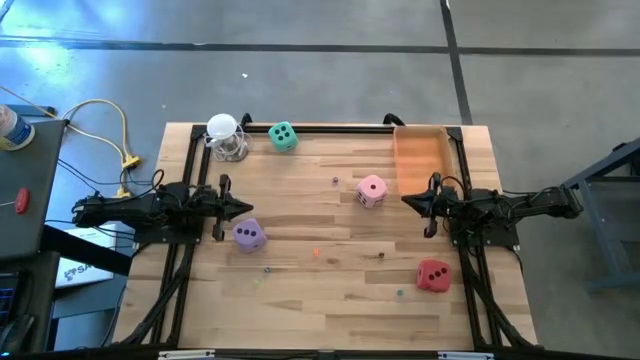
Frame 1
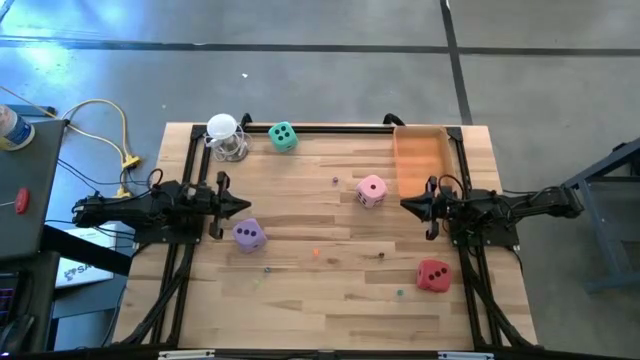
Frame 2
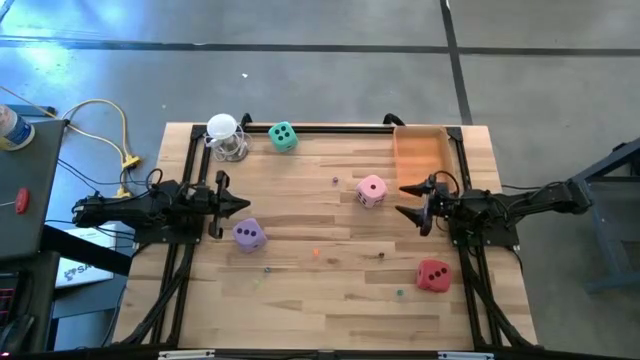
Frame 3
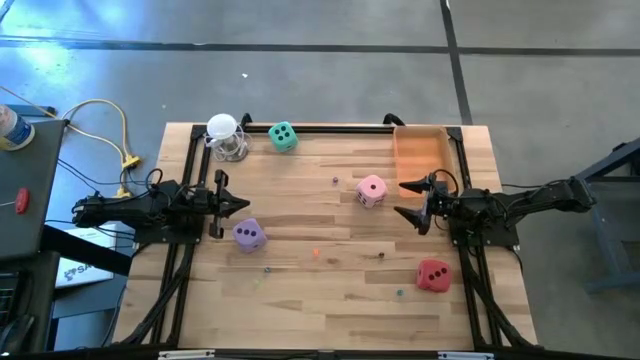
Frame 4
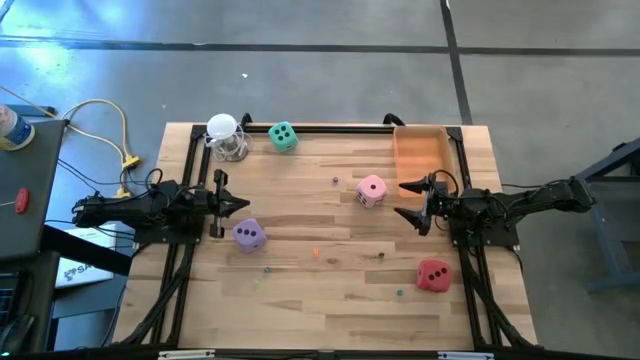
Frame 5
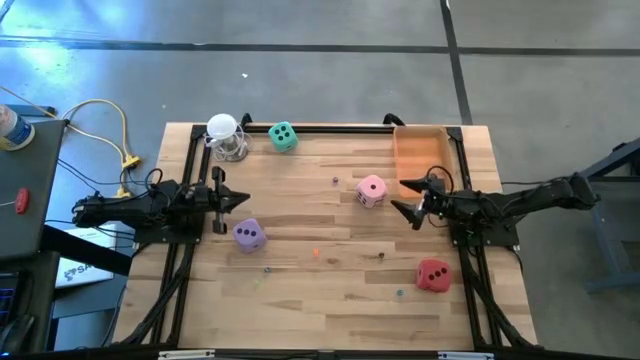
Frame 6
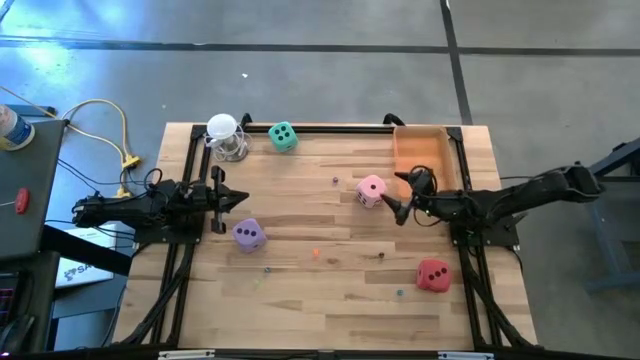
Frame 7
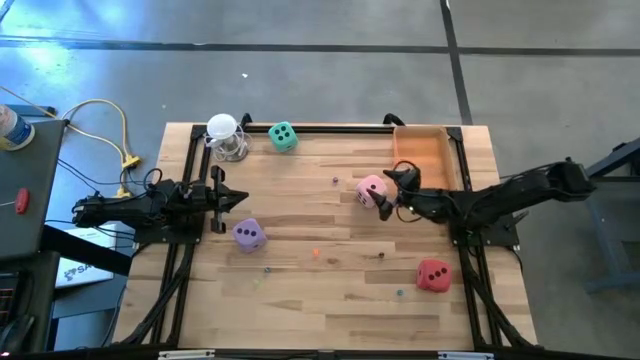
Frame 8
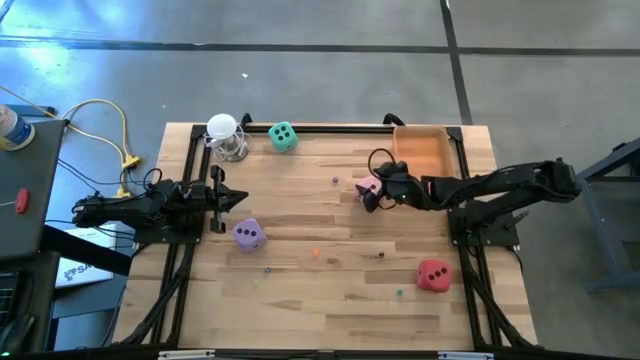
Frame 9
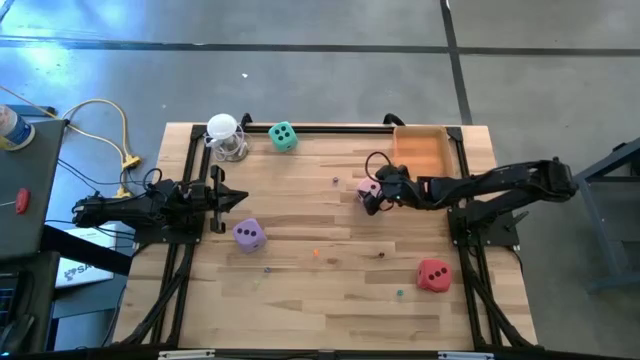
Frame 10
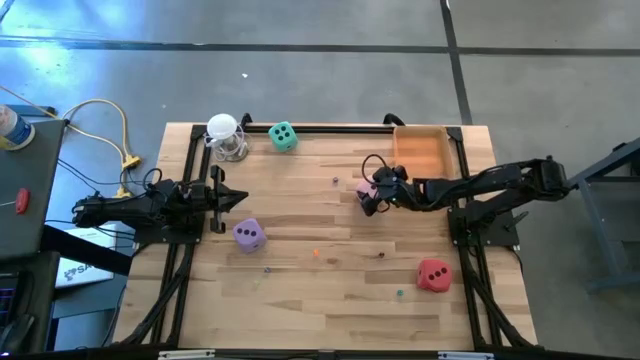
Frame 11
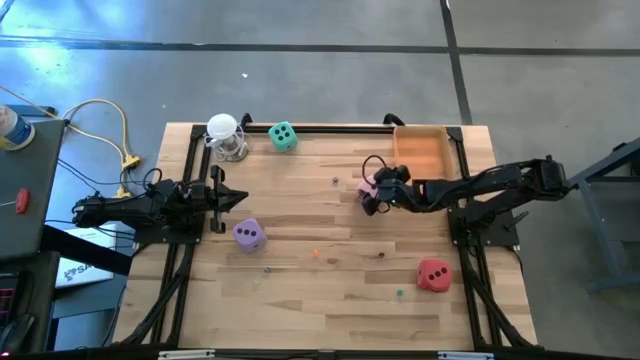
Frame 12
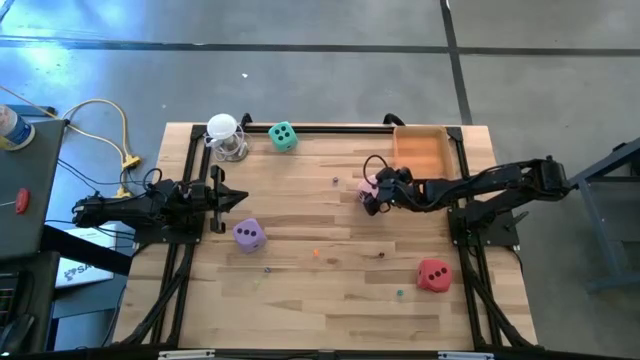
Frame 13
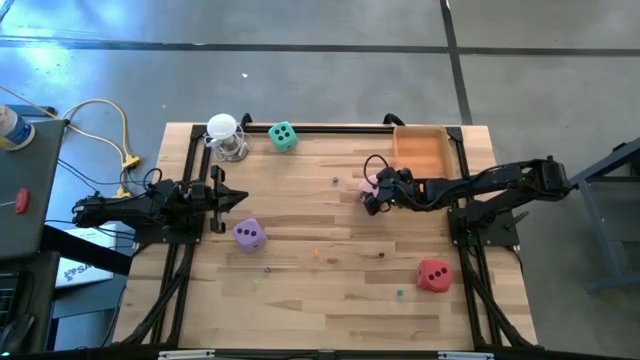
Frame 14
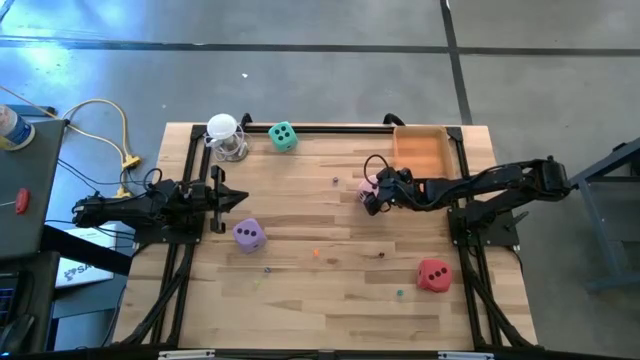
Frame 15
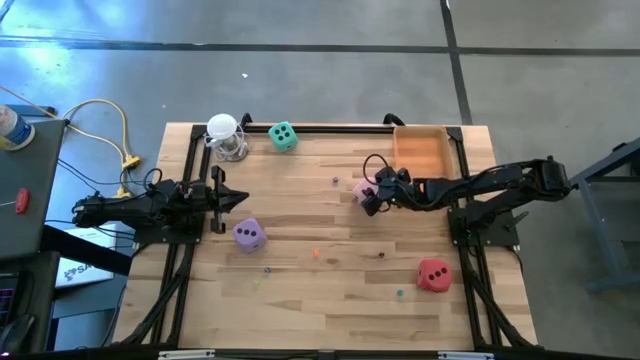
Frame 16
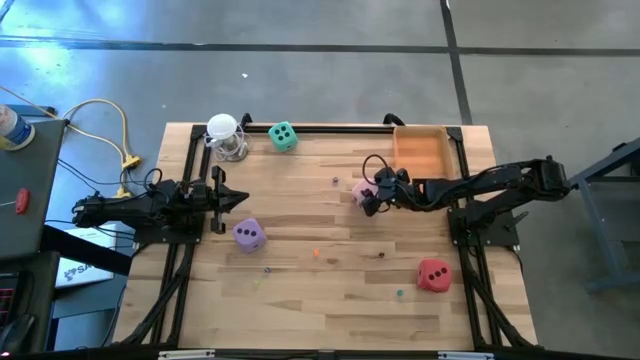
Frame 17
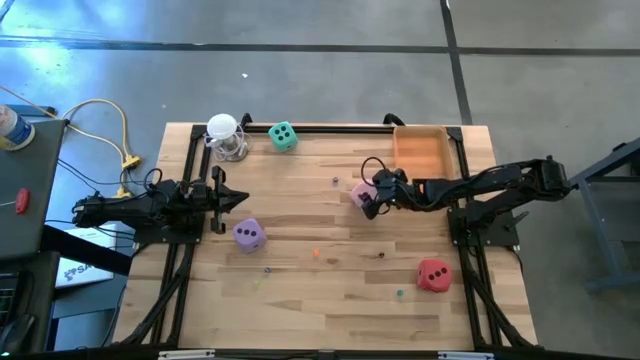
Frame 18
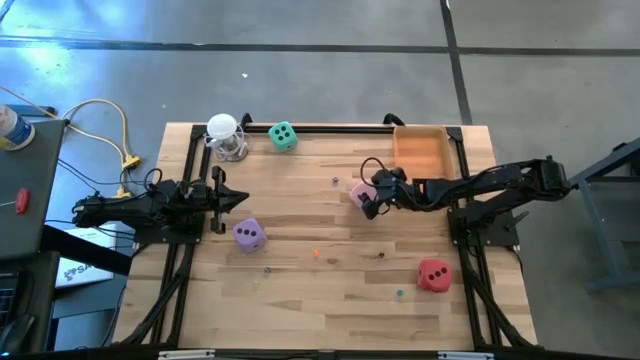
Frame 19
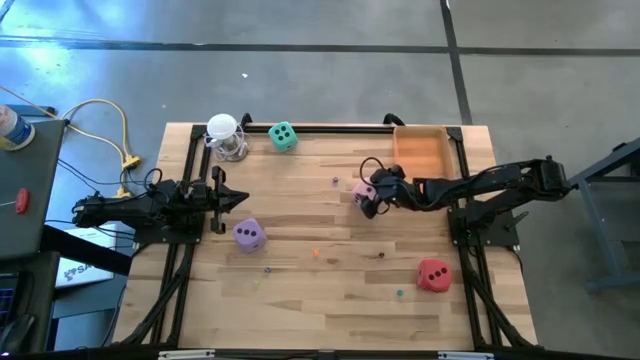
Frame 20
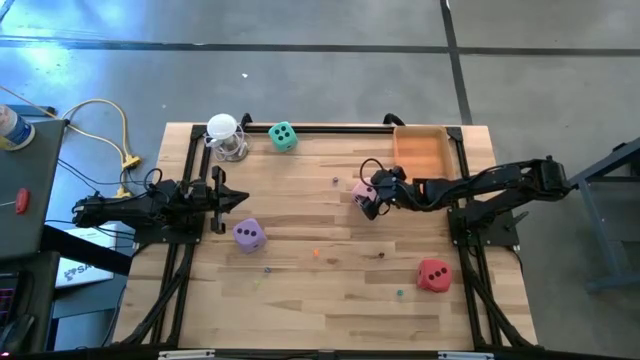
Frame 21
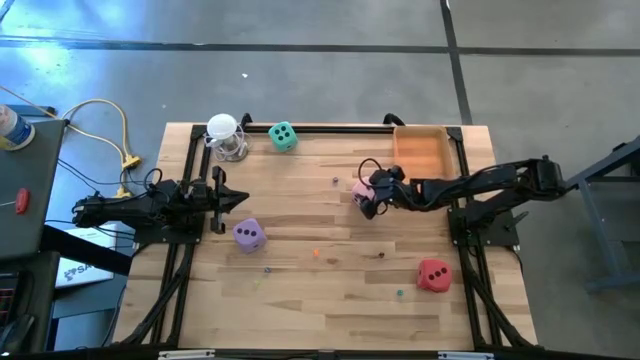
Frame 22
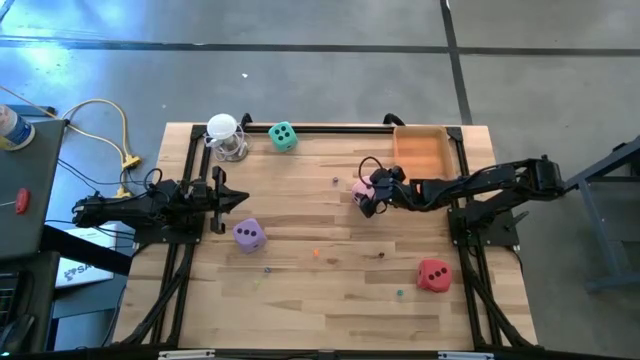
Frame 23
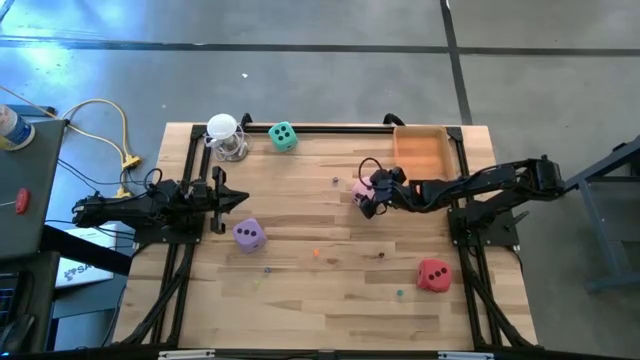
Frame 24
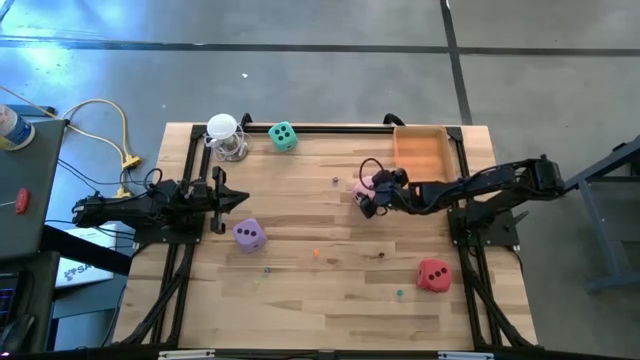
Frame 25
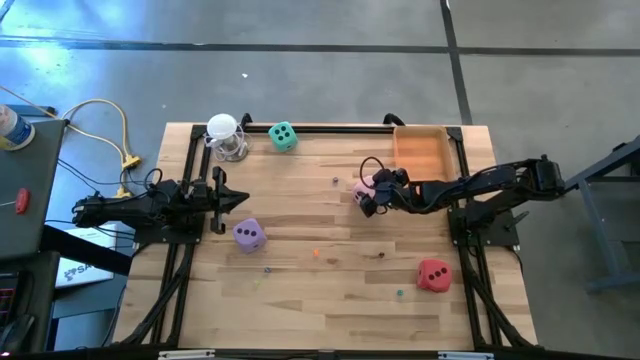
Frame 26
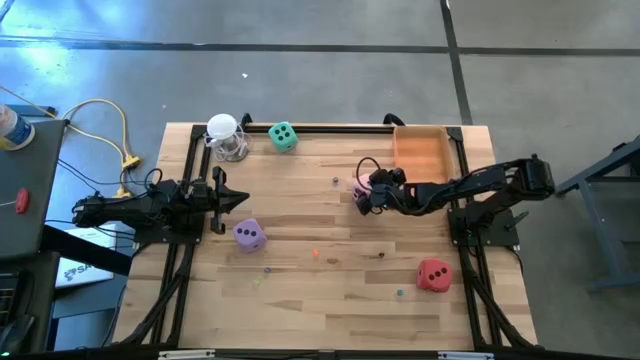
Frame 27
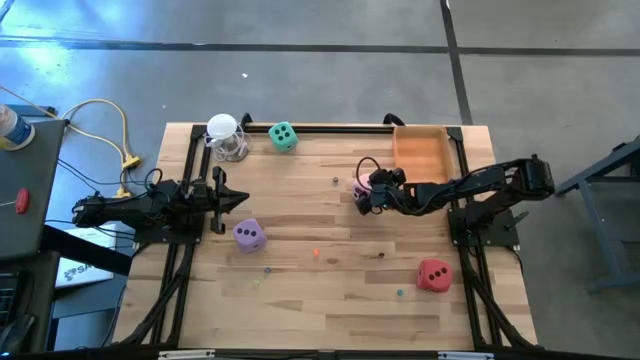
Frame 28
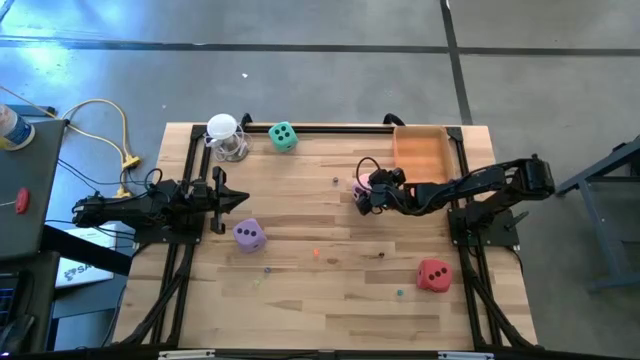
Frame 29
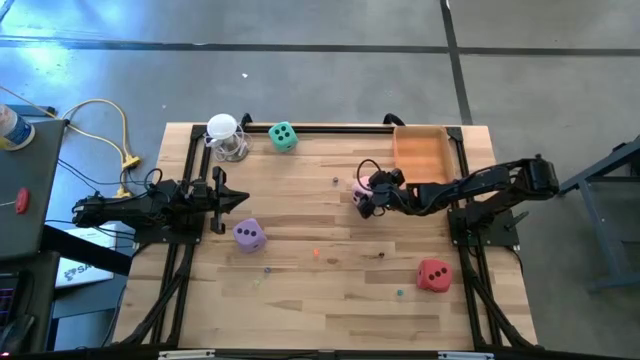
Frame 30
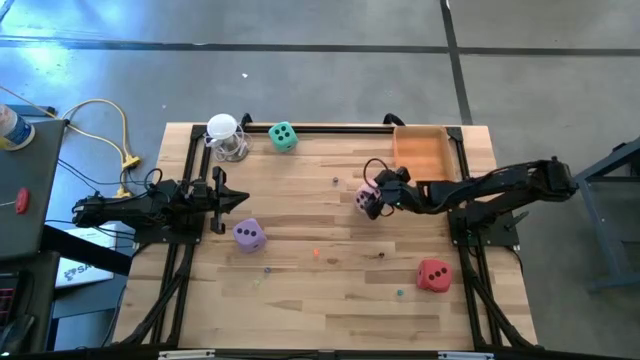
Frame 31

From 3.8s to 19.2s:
Task: Pick & Place Dice
Put the pink large die into the orange bin

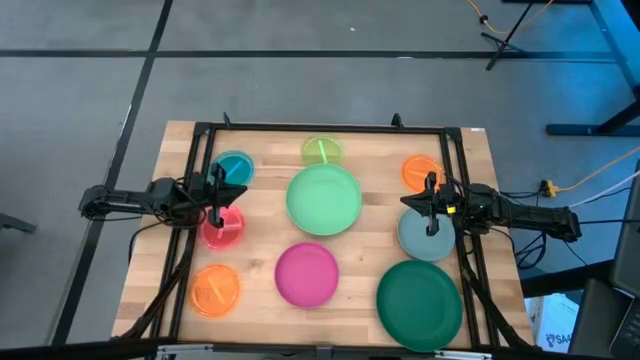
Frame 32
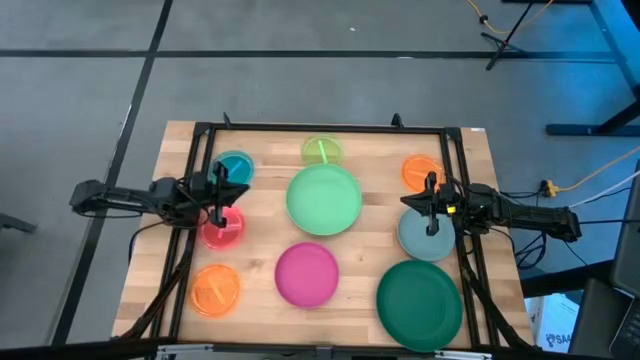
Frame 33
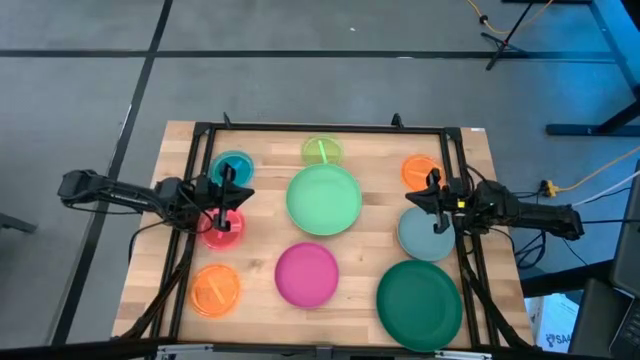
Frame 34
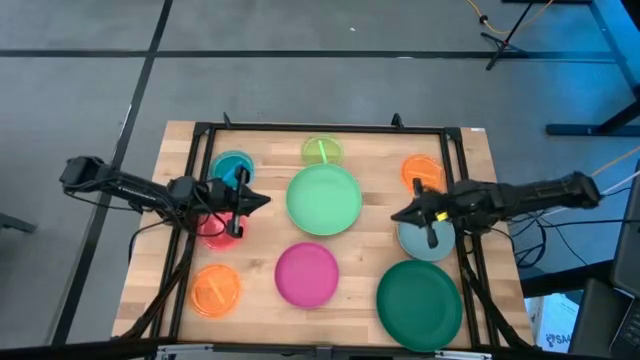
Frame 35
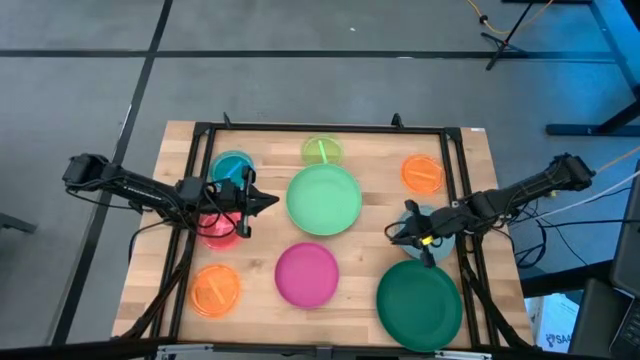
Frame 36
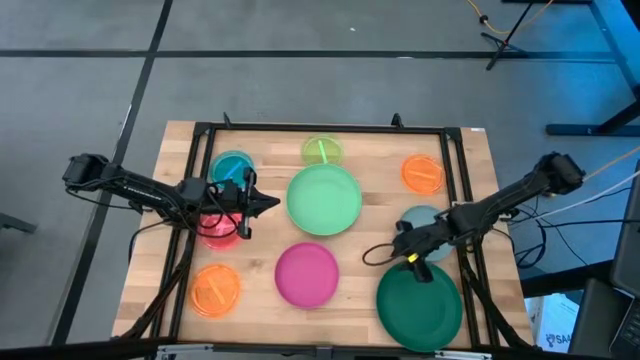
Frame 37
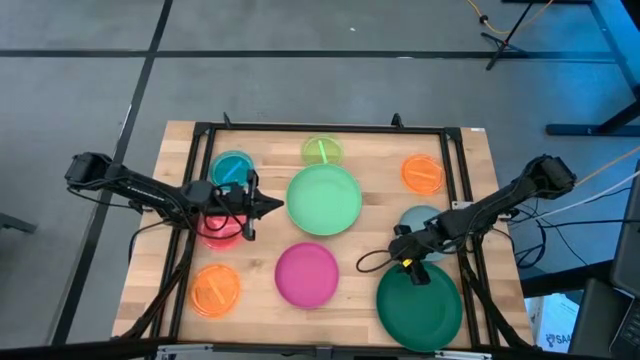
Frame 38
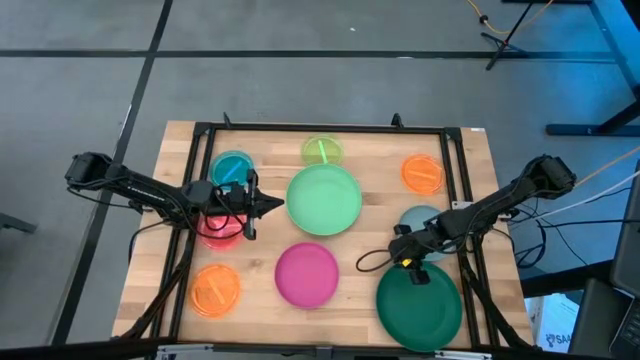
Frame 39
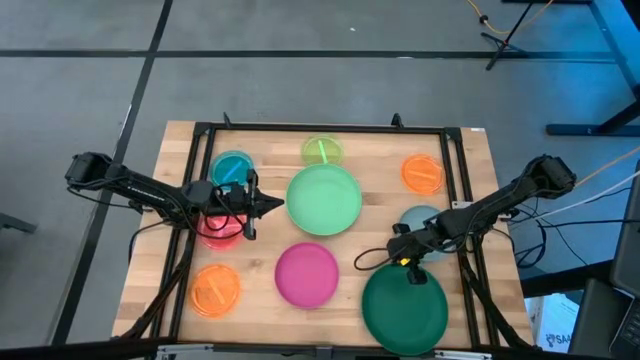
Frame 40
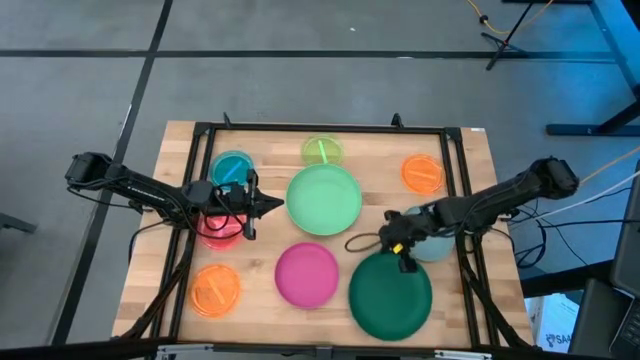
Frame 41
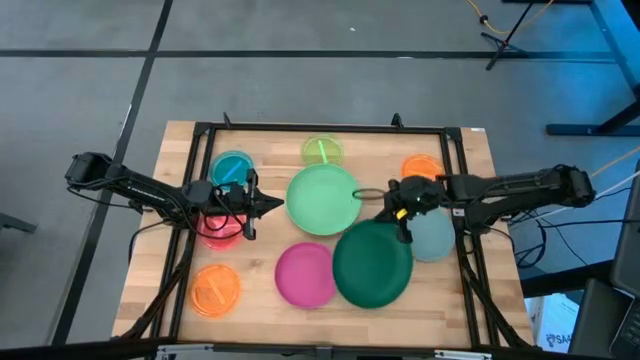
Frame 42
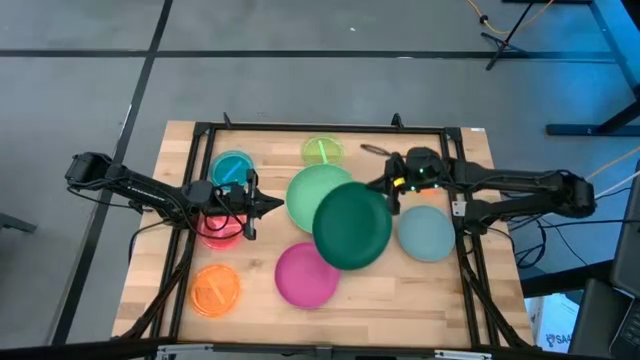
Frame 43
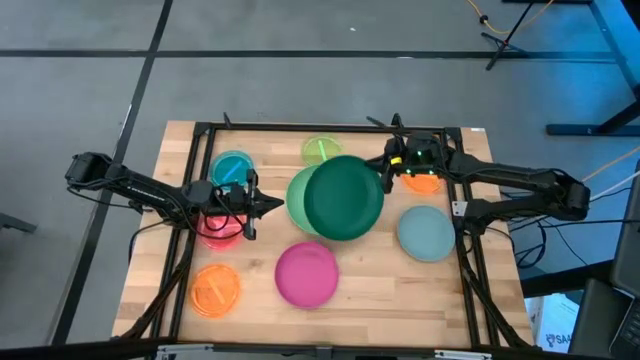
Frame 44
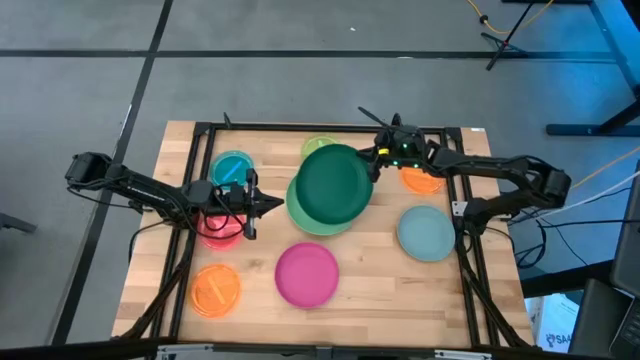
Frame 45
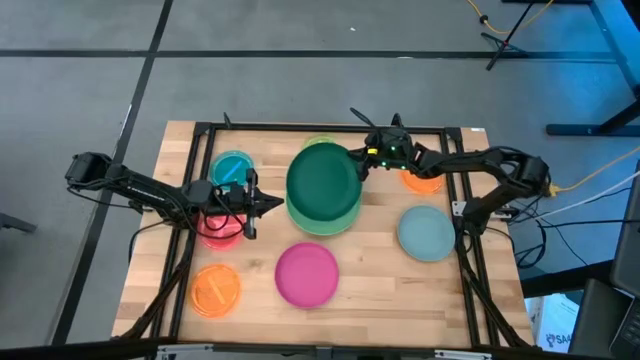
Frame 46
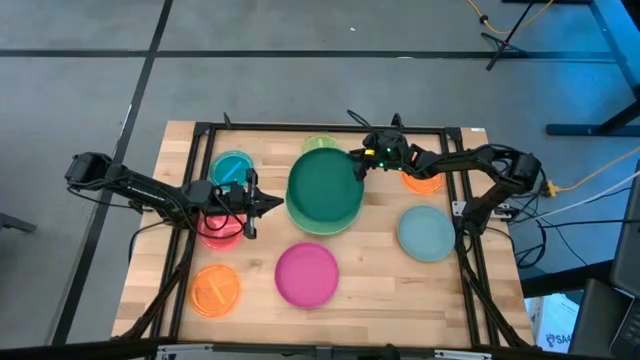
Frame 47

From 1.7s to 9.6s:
Task: Stack plastic plates
Stack the dark green plate on top of the light green plate
